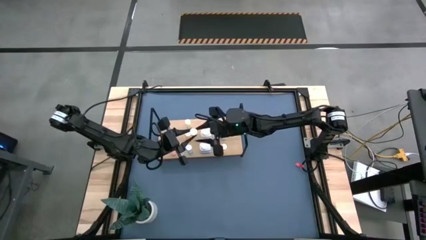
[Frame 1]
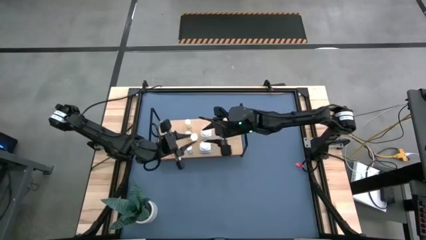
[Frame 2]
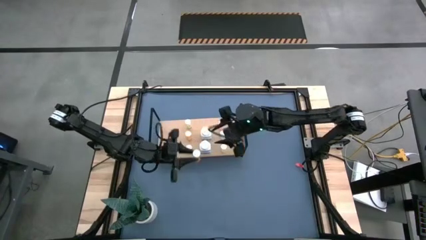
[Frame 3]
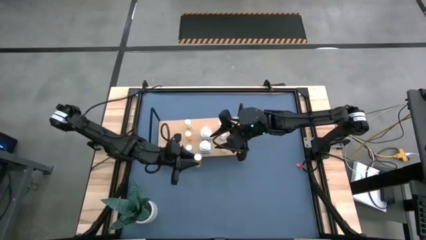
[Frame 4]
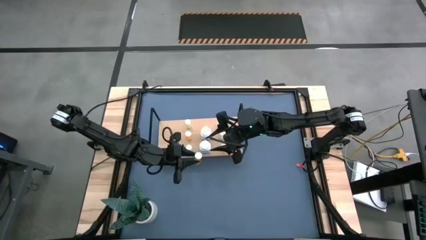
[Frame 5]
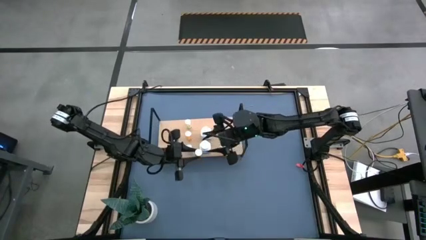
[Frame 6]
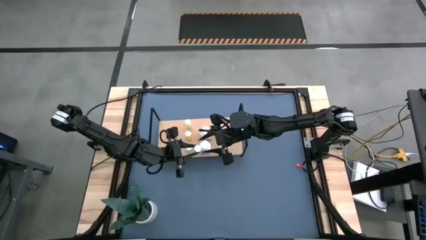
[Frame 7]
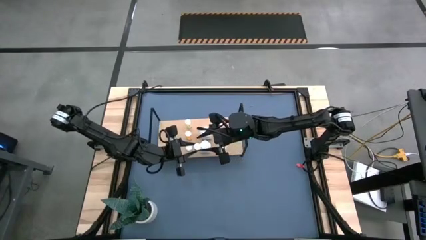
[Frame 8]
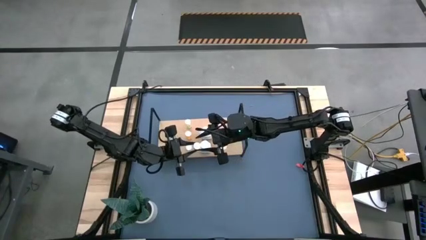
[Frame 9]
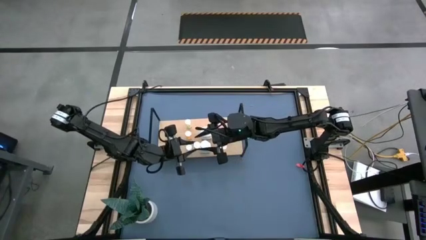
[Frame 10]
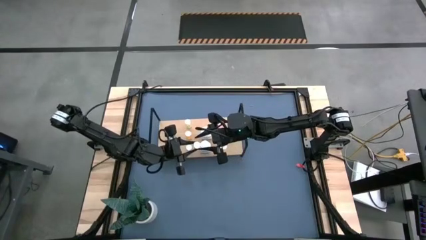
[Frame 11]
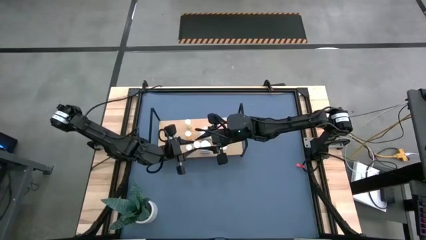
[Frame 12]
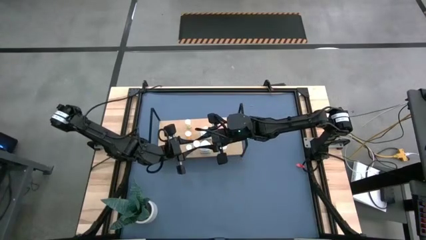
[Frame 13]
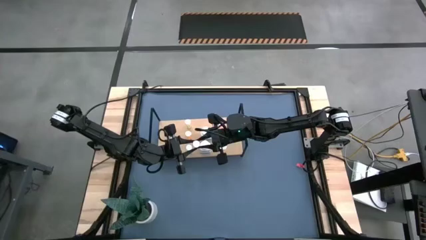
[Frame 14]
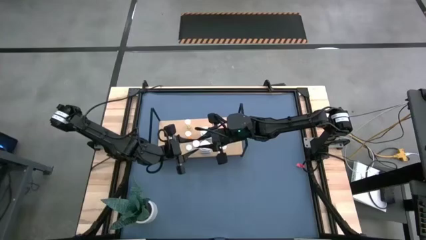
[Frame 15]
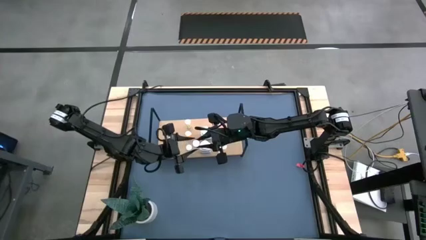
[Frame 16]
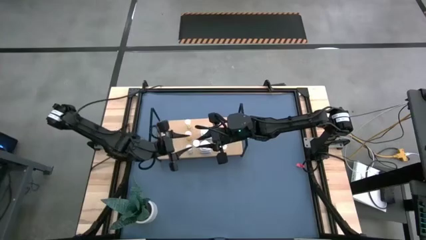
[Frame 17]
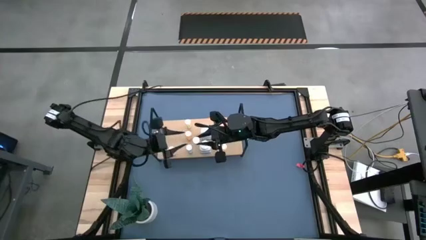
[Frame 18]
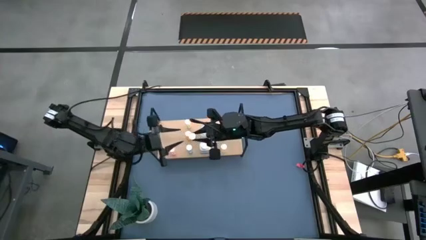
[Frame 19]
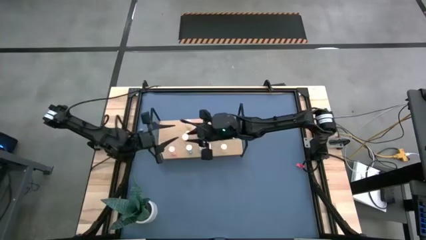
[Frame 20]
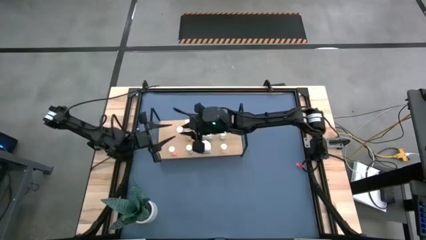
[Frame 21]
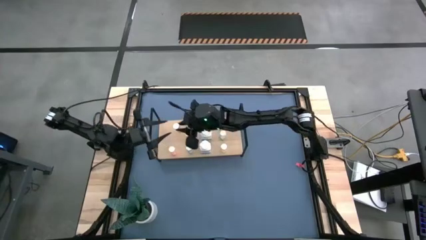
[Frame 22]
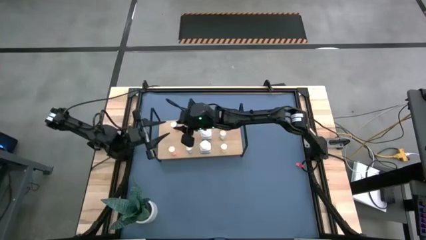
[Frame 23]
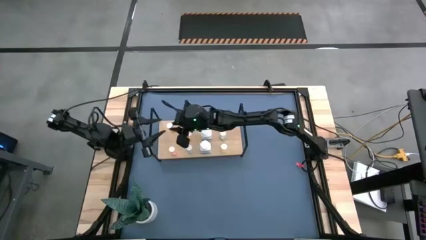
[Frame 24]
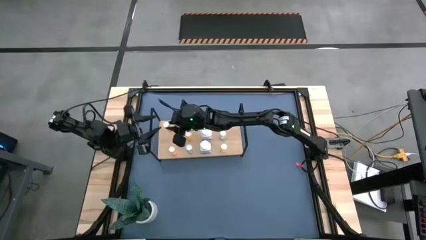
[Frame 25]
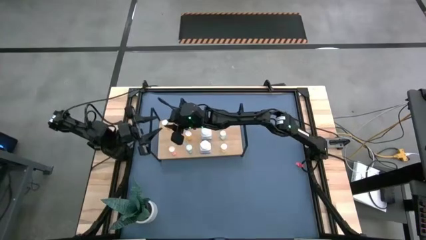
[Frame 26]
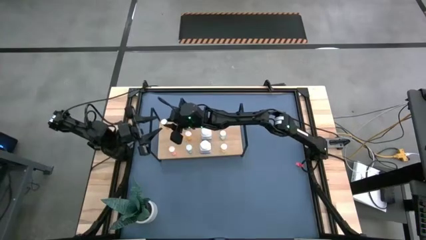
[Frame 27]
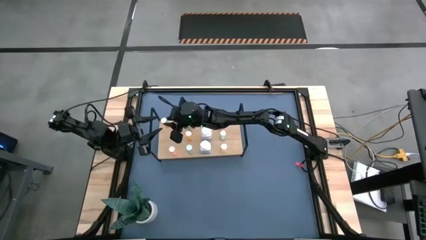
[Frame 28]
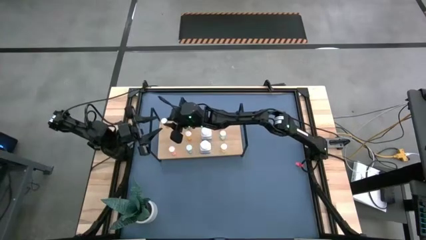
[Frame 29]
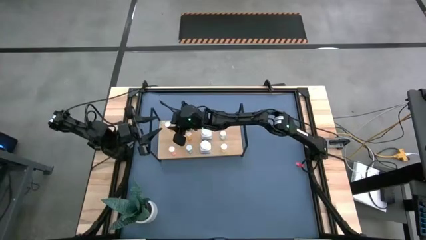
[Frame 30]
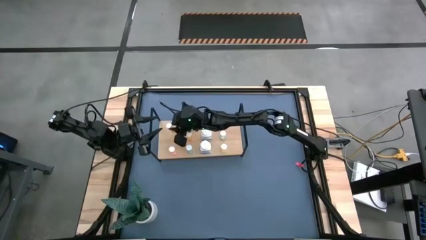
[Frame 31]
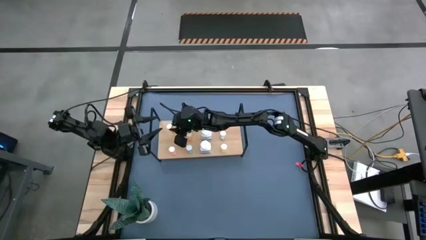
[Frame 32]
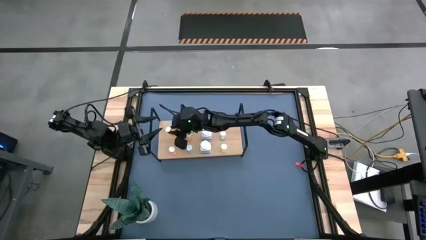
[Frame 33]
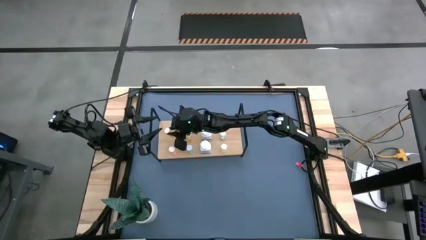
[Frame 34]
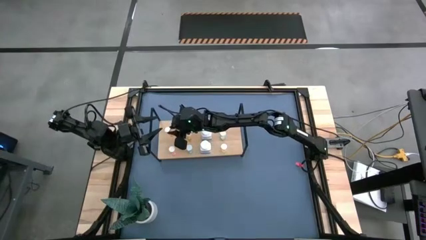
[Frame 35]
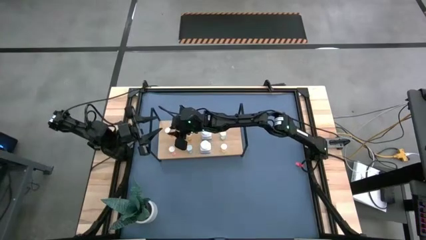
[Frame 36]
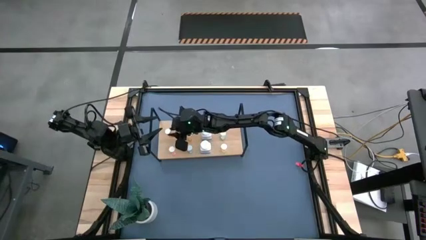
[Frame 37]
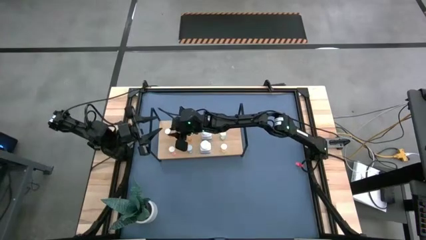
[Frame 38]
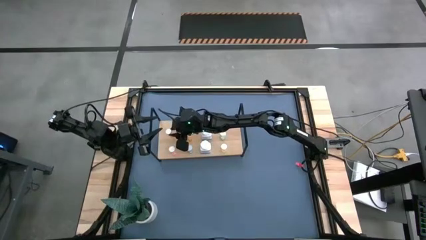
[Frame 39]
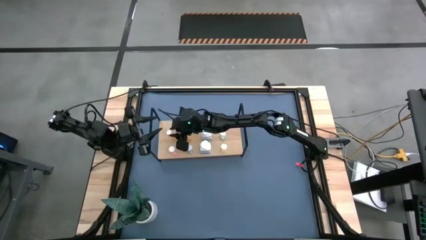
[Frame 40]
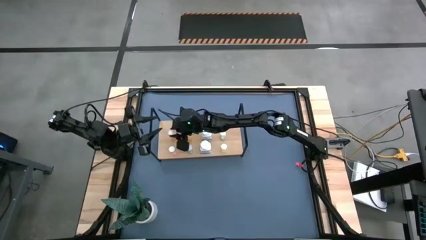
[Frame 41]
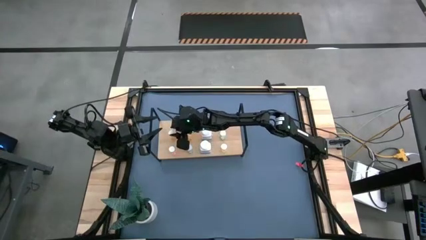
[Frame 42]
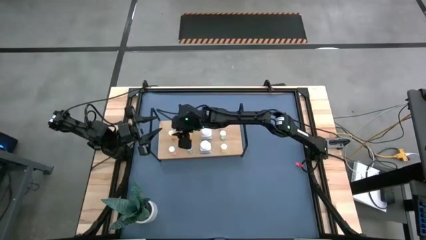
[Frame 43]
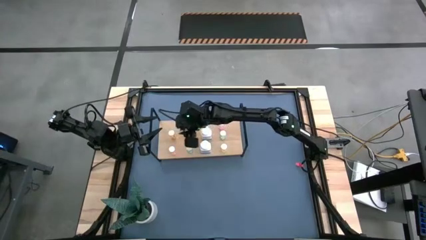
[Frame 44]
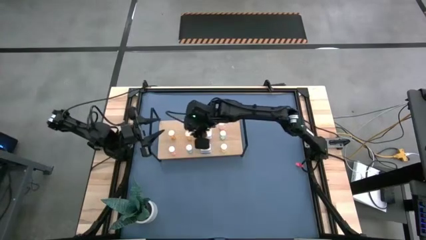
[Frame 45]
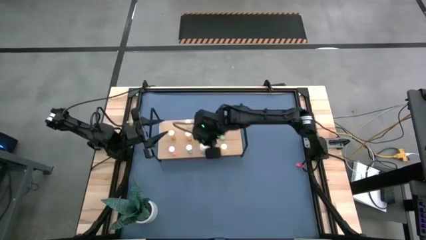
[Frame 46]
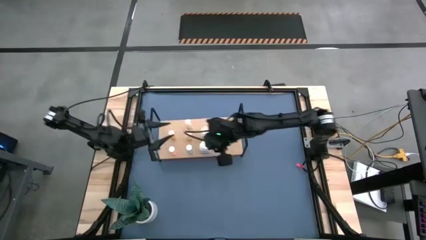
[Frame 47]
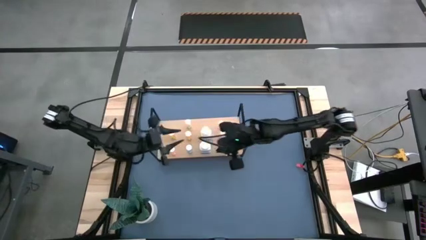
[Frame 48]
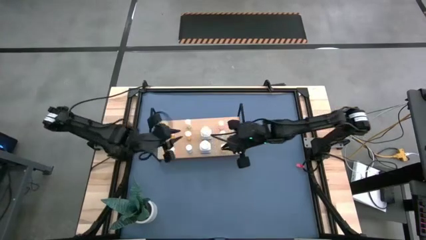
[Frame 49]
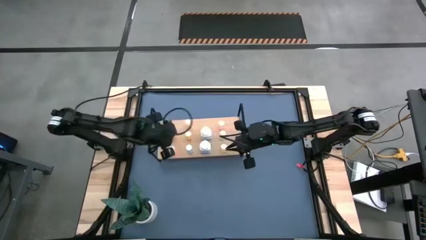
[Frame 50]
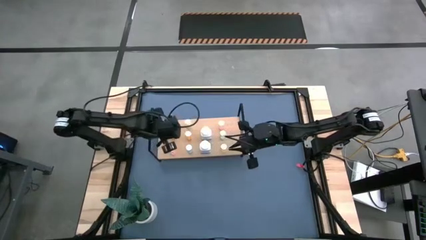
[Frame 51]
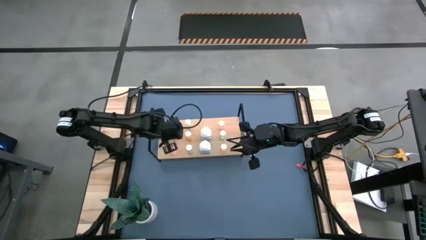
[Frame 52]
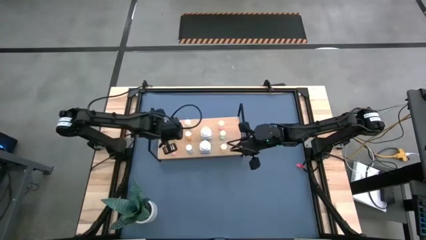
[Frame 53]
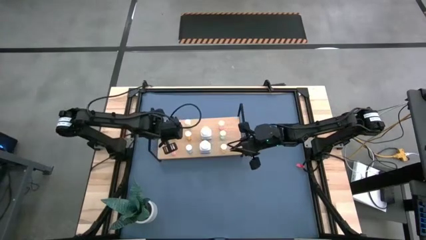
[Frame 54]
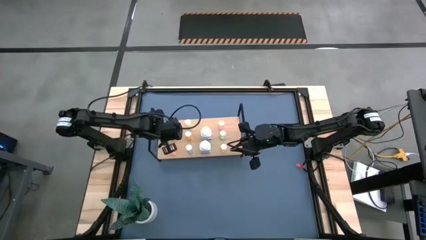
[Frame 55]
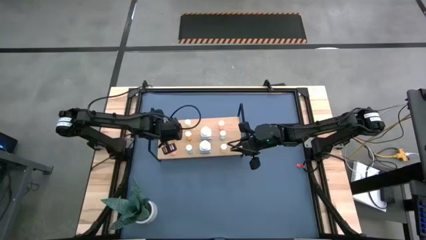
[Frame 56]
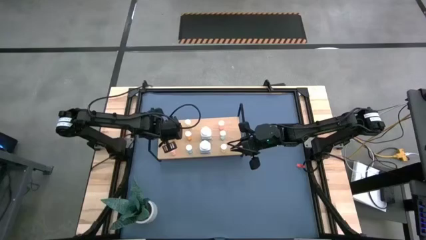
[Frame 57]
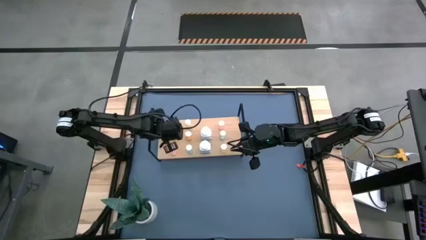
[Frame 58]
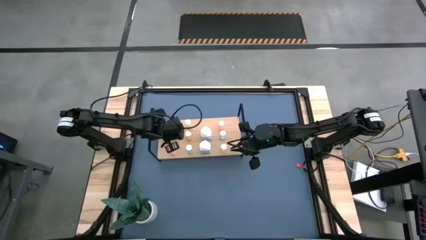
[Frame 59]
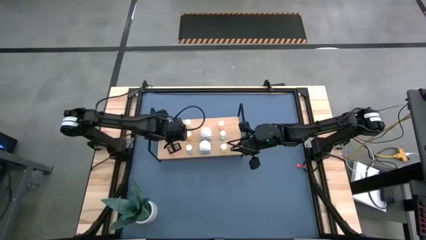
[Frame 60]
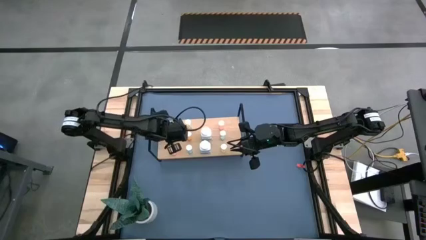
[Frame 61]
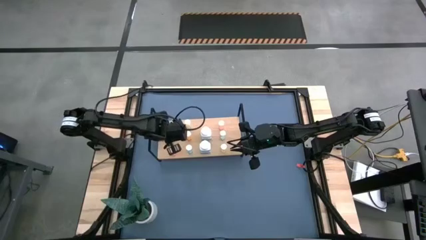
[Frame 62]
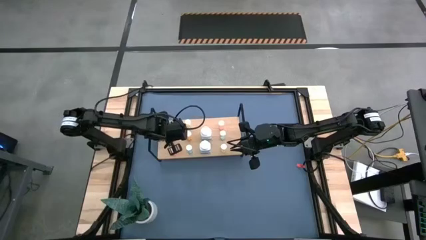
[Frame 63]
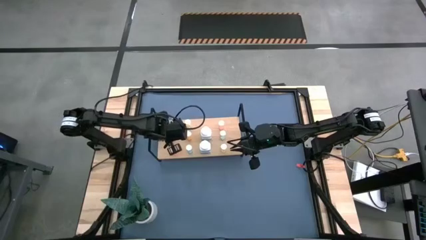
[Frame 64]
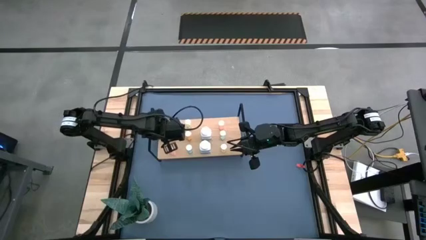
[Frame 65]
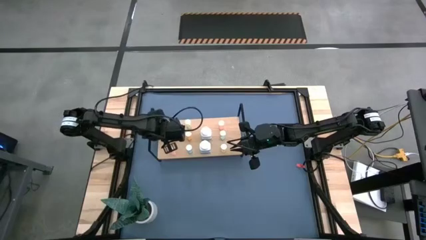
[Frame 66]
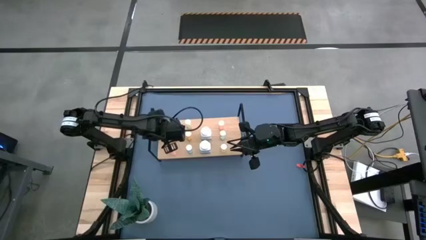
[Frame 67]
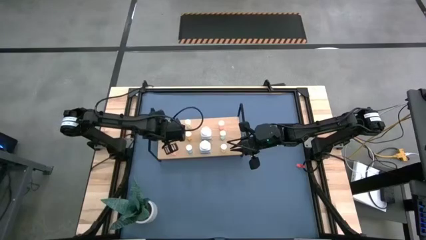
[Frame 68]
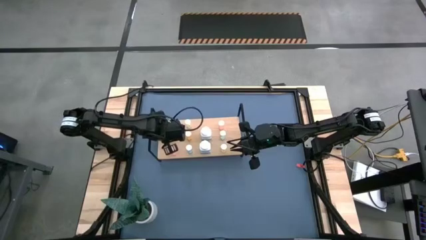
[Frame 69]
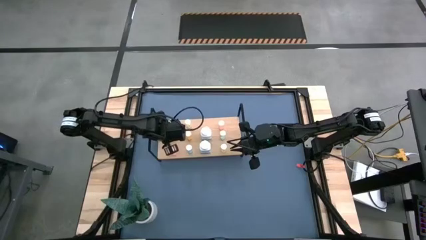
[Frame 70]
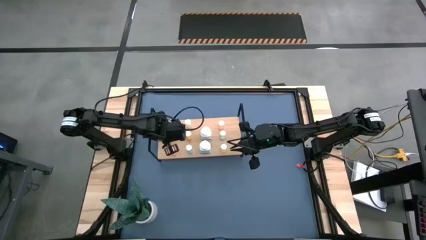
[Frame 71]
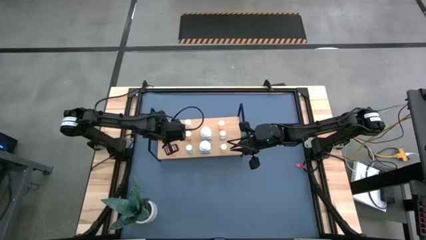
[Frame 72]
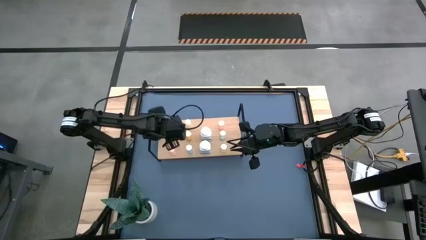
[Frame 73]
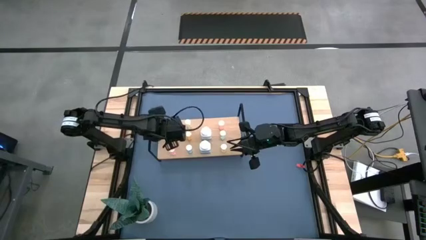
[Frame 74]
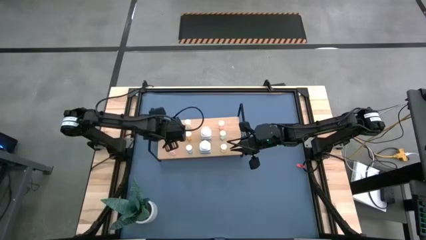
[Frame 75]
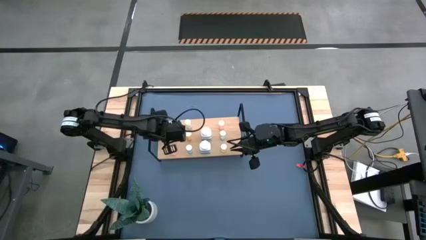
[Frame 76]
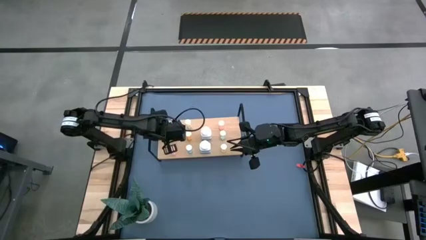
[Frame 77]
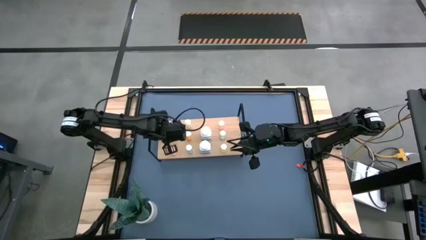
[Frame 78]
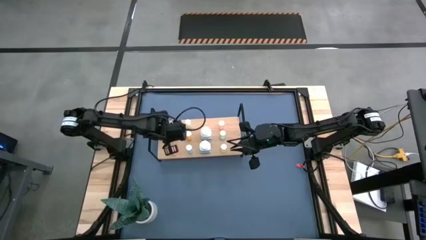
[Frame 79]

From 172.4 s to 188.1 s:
Task: Pick and place medicine bottles onto shelf by color
Put the orange pill bottle on the shelf
